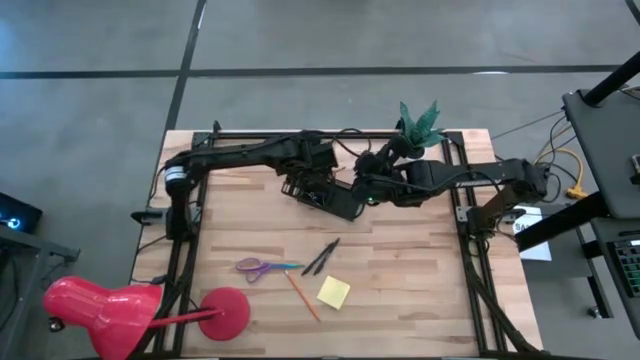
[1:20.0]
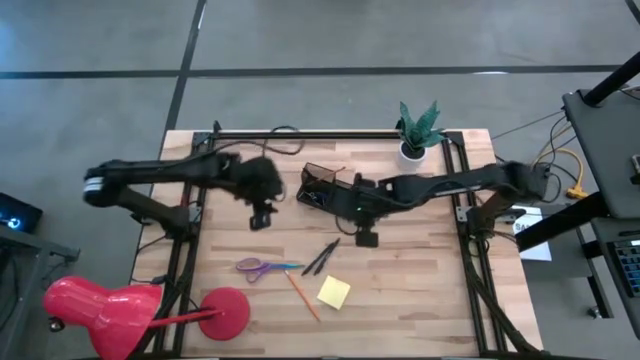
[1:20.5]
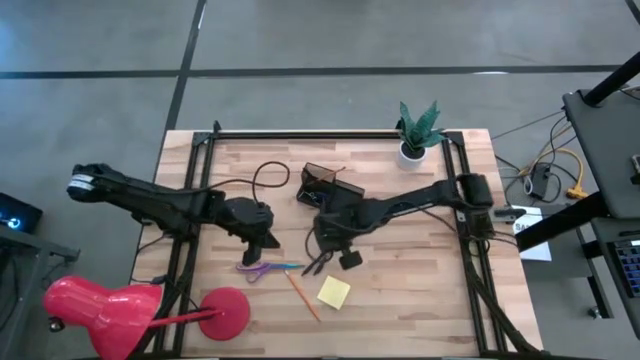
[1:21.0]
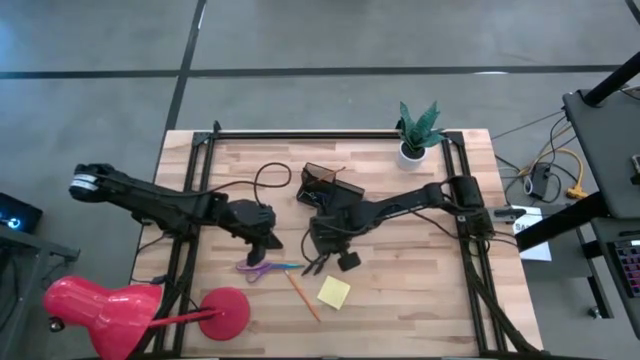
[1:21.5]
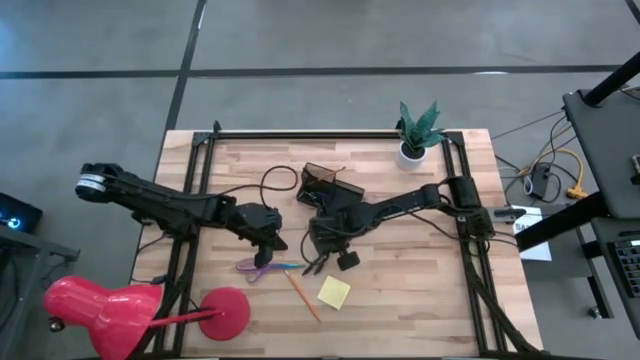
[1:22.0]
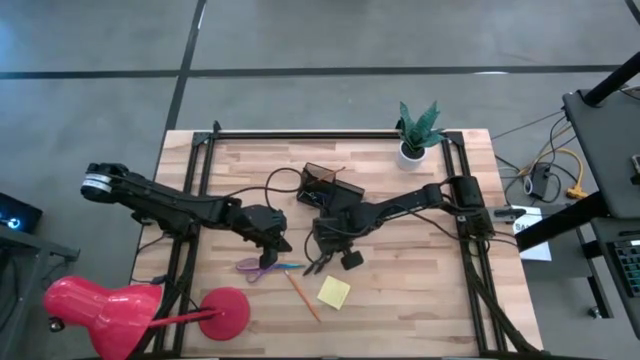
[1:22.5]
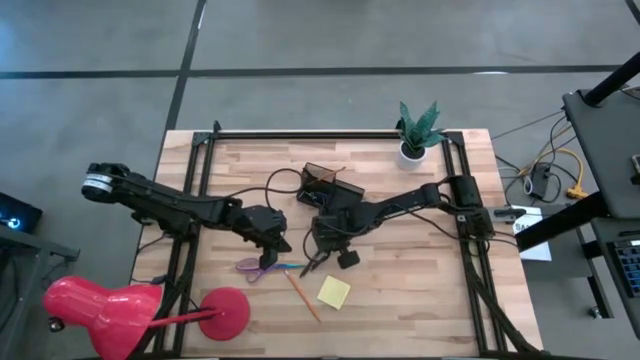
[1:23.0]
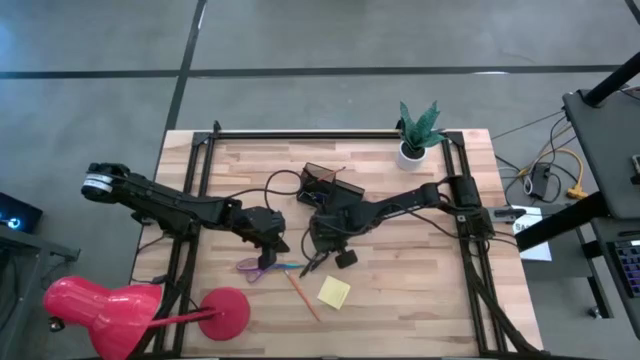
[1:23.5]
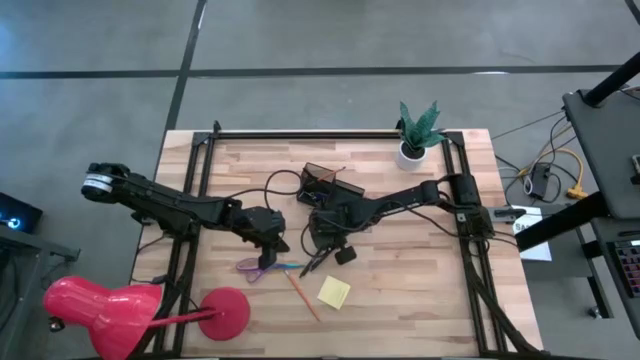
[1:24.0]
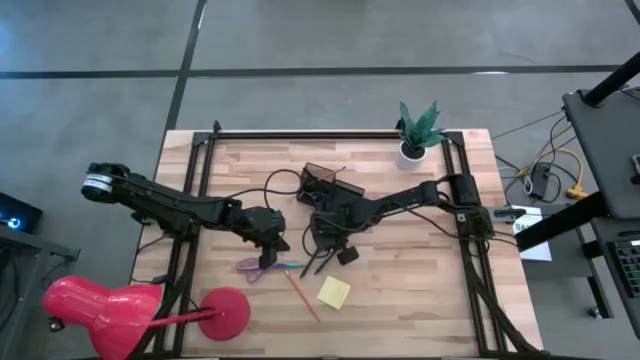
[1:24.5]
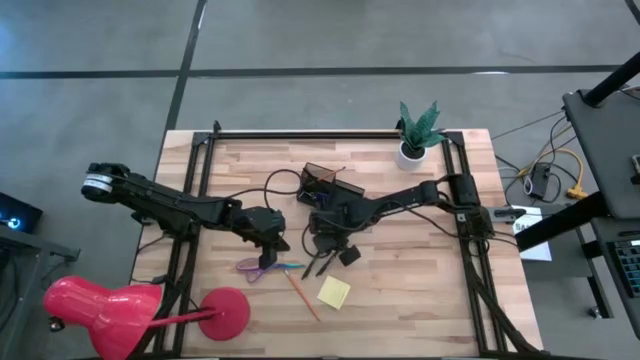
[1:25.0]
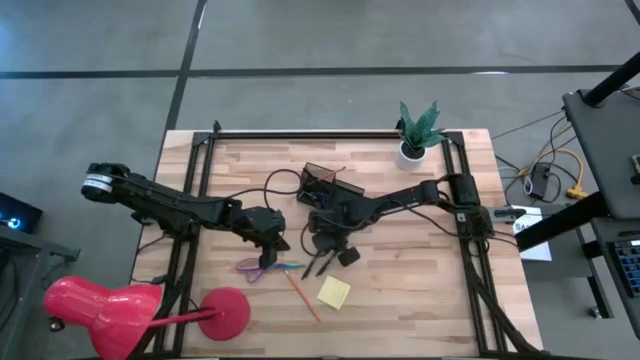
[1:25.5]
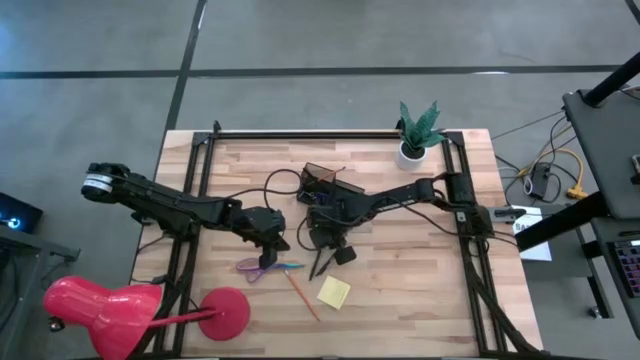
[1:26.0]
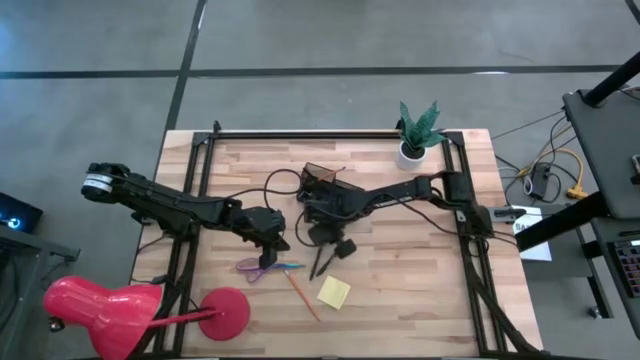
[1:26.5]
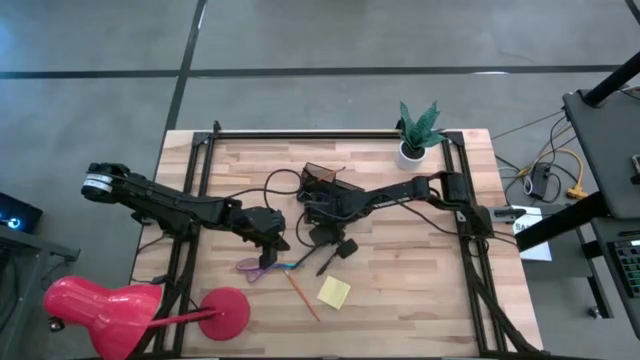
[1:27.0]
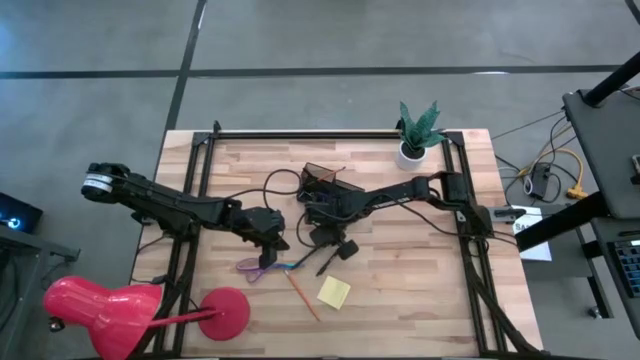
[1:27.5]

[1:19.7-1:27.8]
Task: Pick and place office supplies into organizer
Put the left pen into the desk organizer

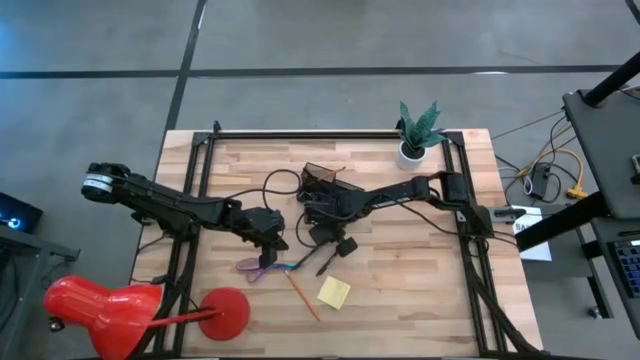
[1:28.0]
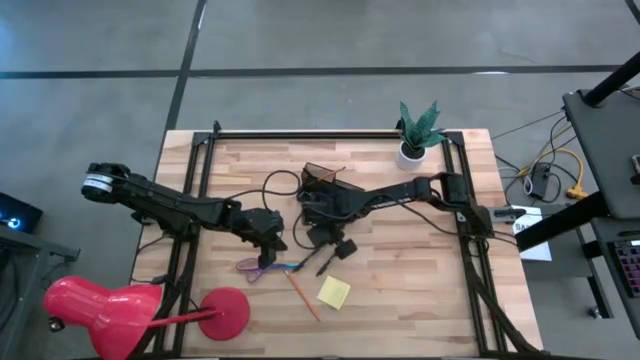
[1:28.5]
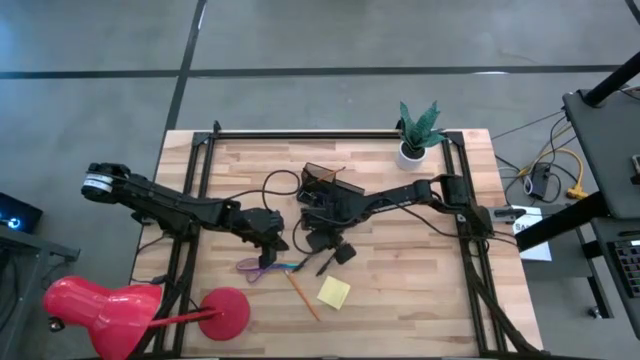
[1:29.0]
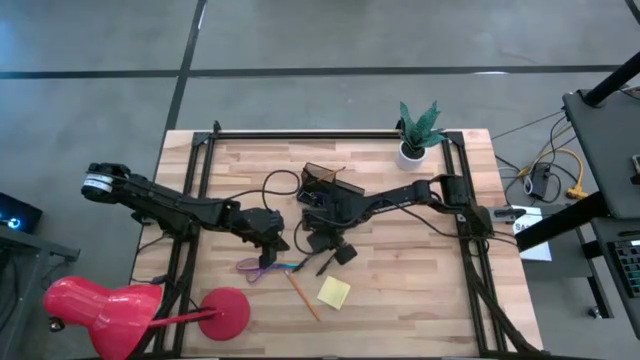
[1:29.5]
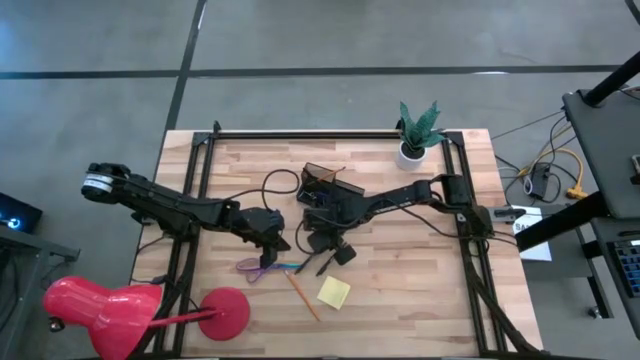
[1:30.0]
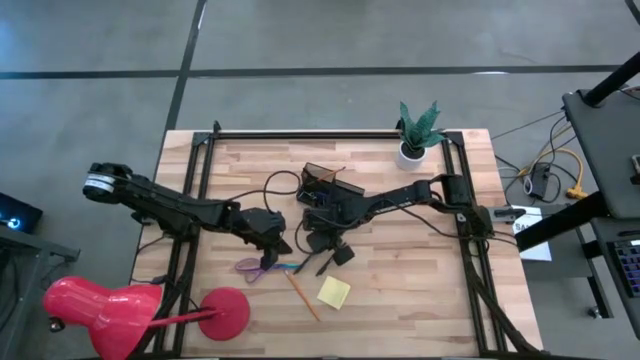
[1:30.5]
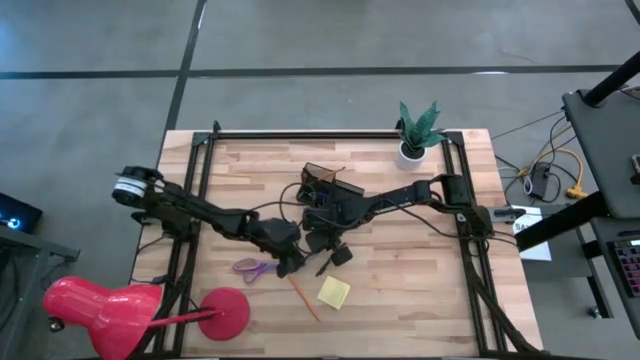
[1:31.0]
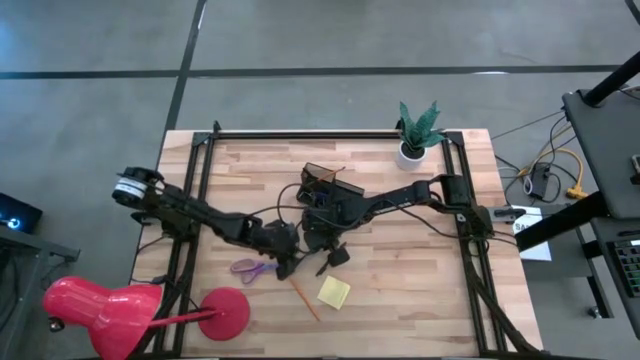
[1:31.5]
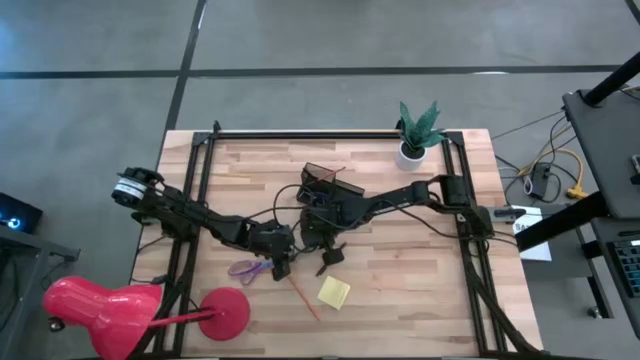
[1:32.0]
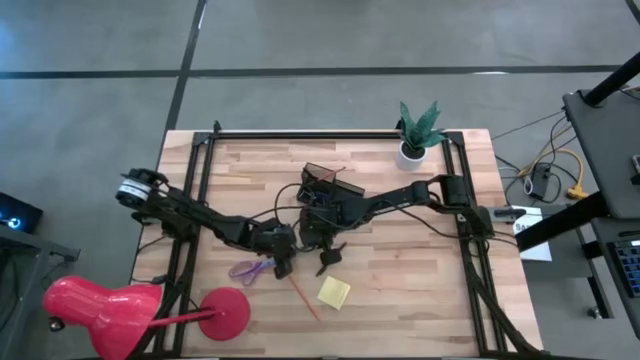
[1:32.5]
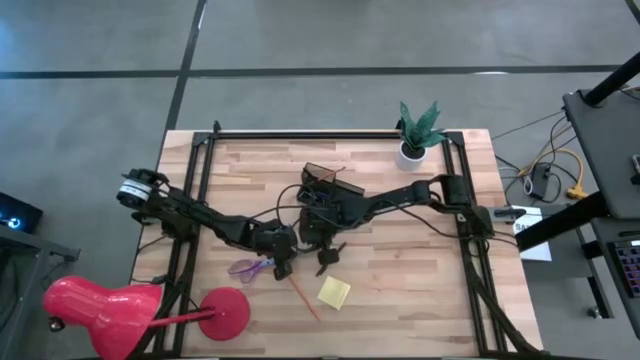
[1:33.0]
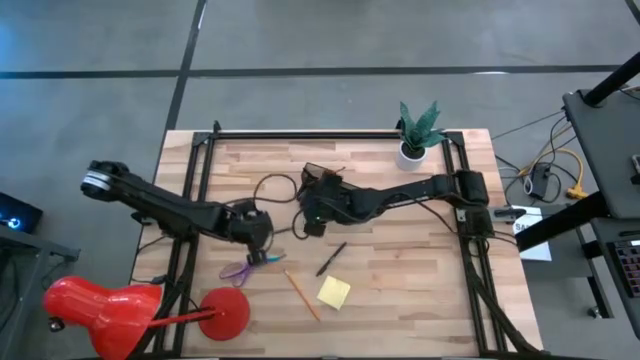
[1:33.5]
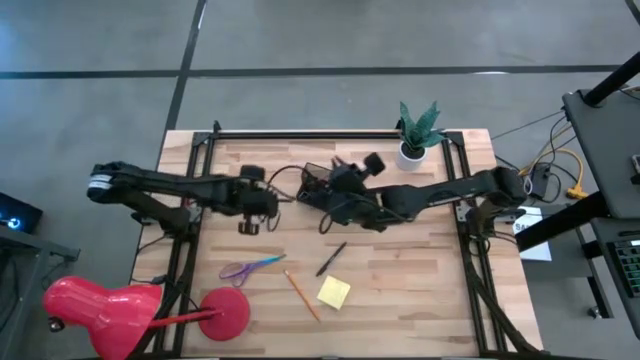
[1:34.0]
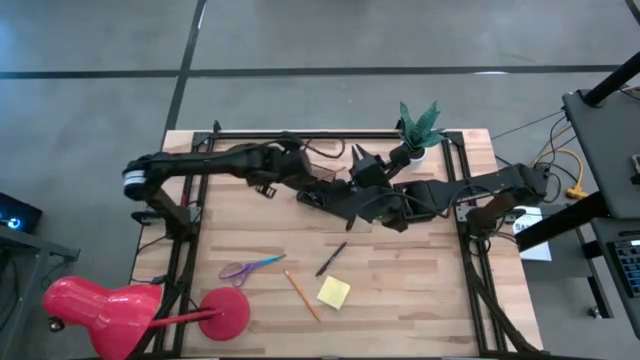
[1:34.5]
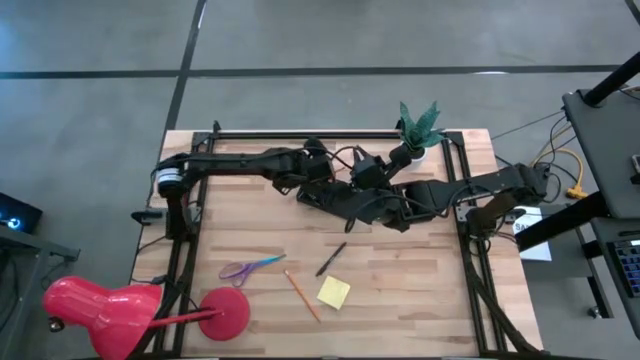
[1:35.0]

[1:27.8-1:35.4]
Put the left pen into the desk organizer

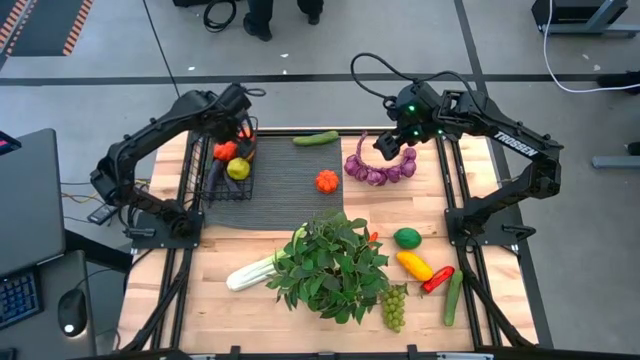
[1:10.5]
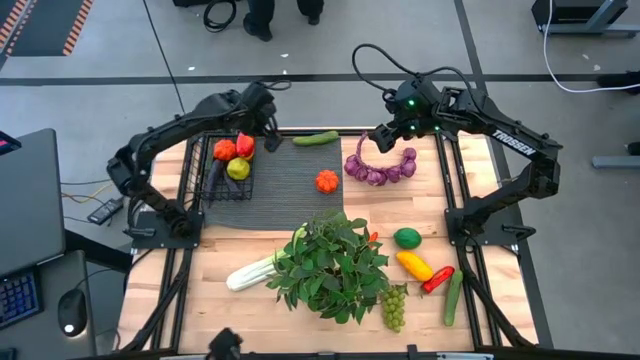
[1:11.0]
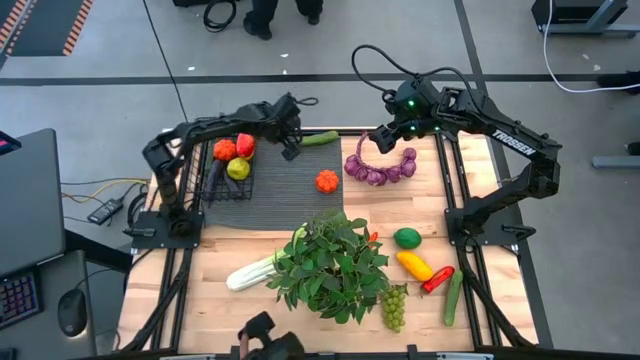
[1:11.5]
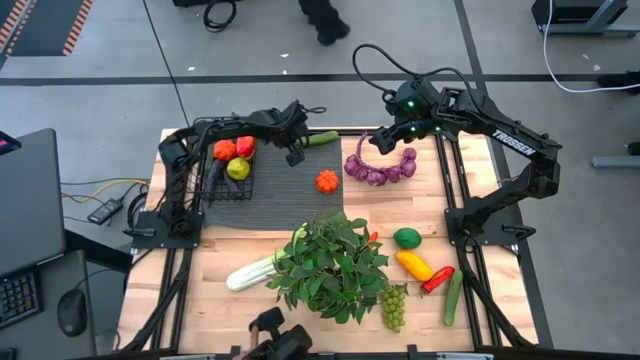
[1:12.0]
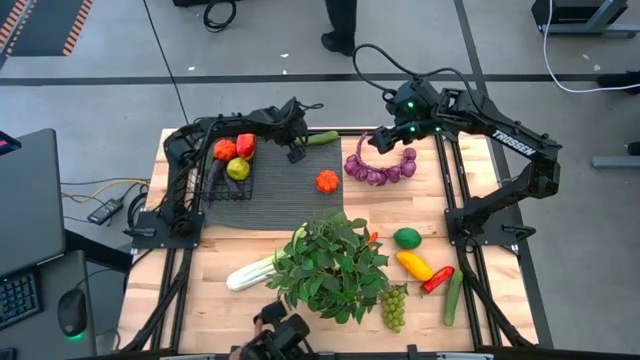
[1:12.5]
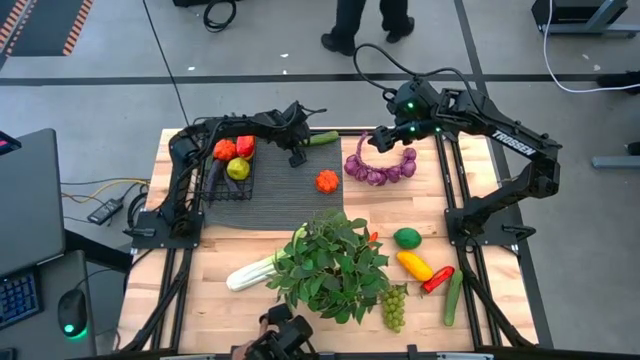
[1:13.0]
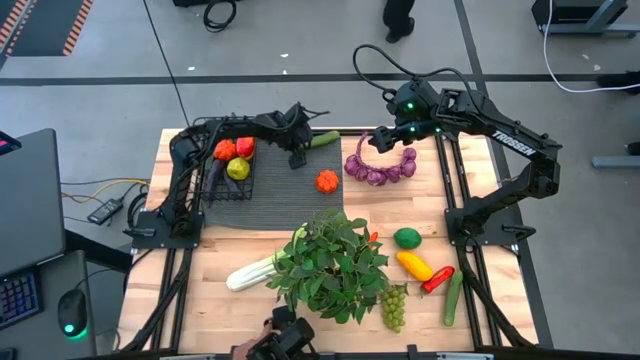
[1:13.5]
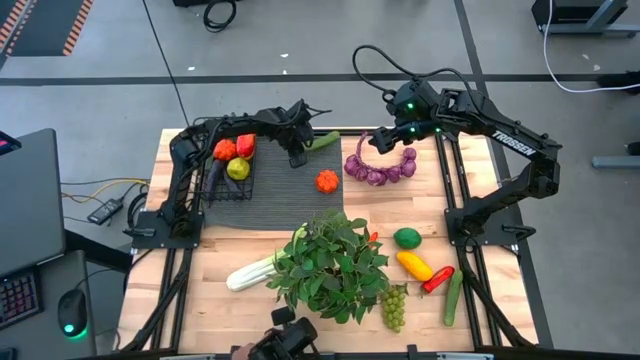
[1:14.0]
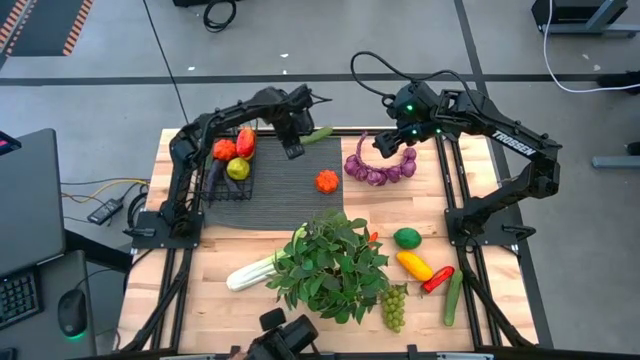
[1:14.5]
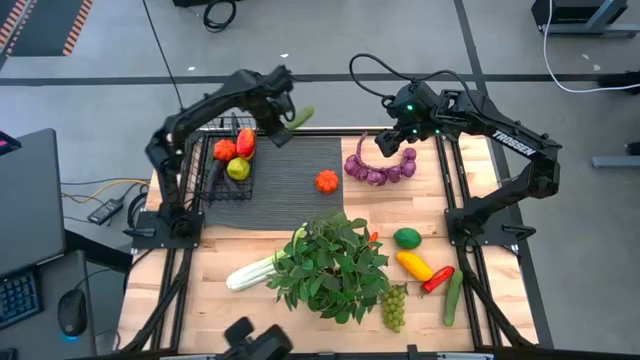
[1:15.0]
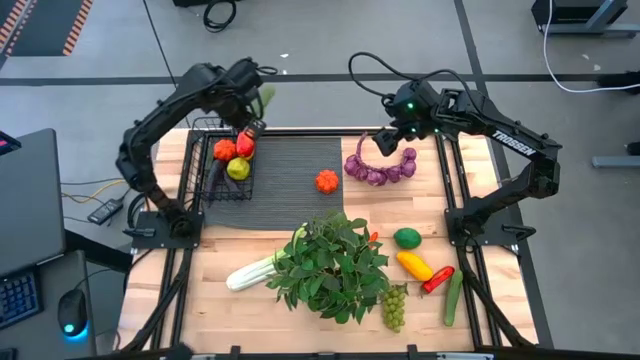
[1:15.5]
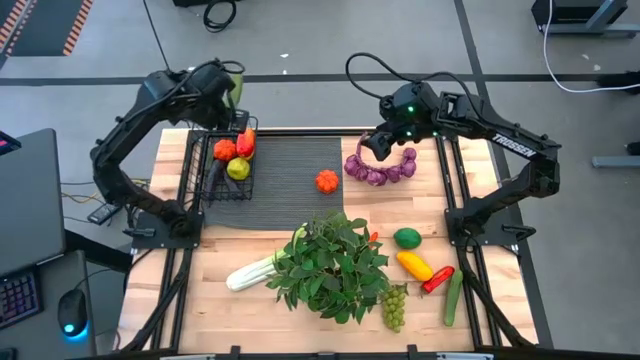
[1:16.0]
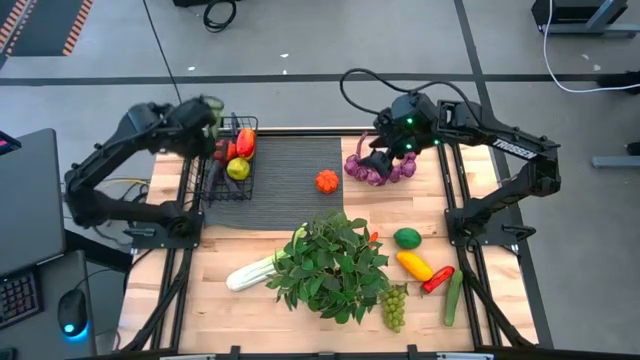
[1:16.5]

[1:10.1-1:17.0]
Task: Build produce basket
Put the top green cucumber into the wire basket
